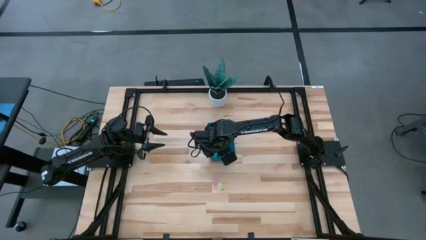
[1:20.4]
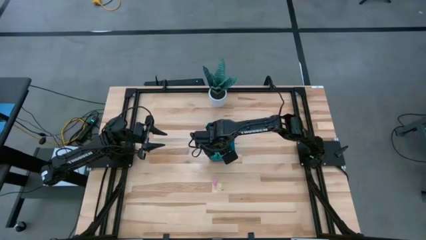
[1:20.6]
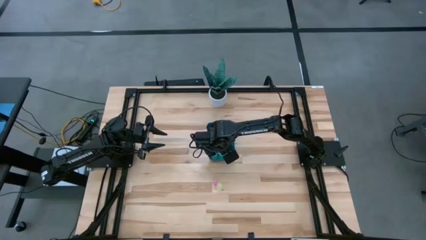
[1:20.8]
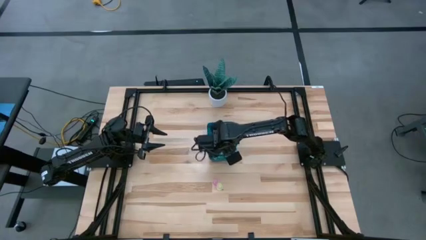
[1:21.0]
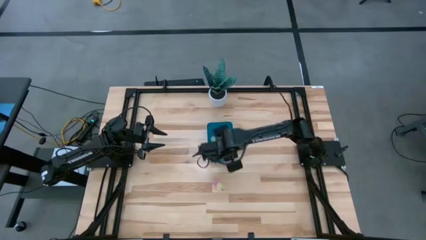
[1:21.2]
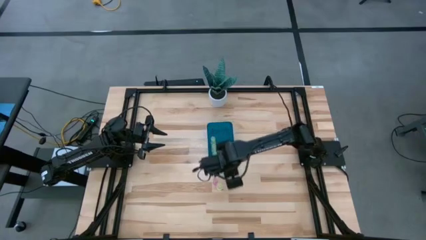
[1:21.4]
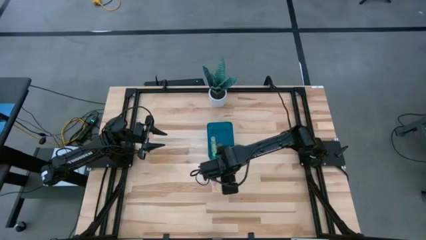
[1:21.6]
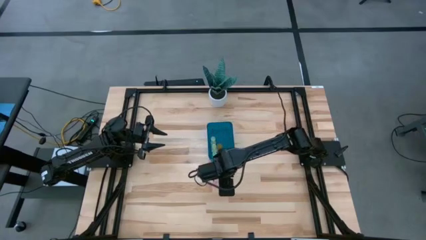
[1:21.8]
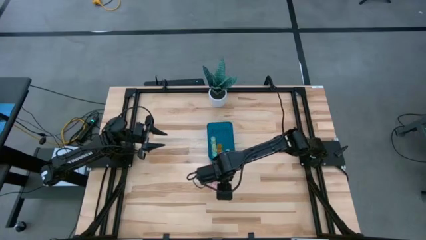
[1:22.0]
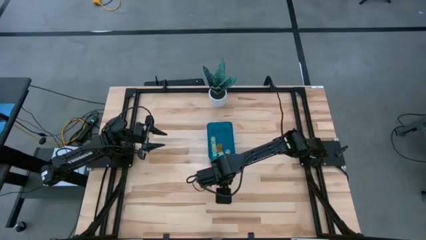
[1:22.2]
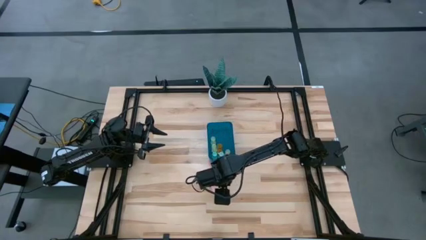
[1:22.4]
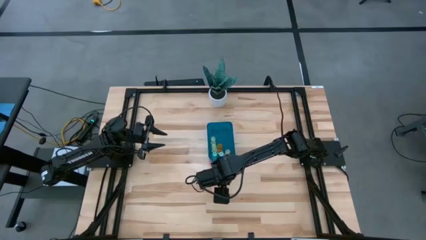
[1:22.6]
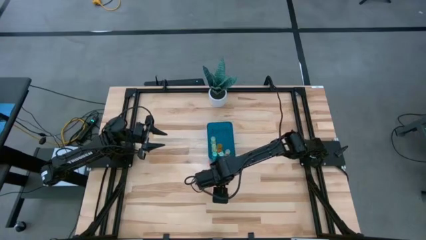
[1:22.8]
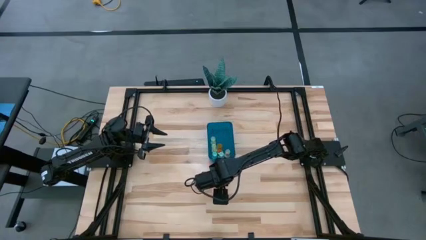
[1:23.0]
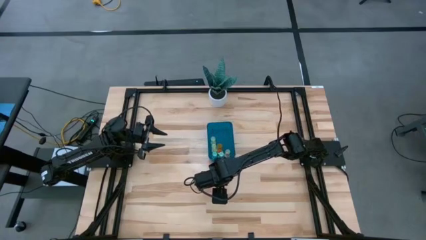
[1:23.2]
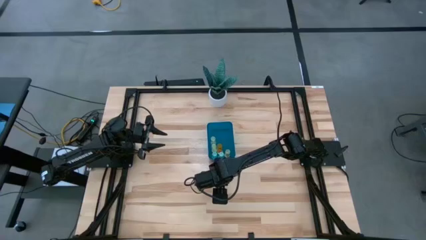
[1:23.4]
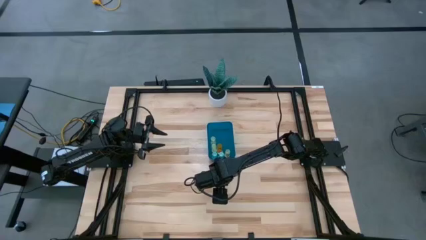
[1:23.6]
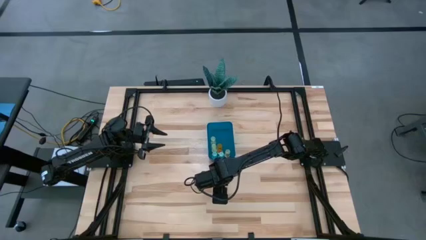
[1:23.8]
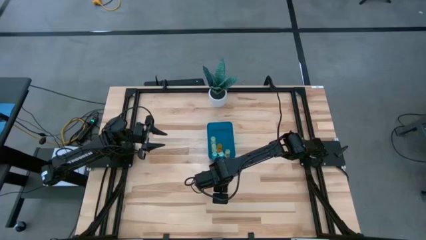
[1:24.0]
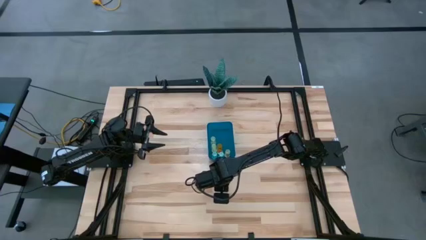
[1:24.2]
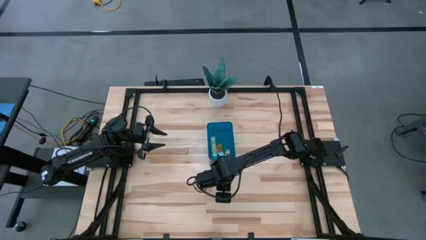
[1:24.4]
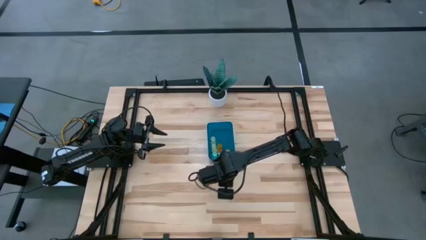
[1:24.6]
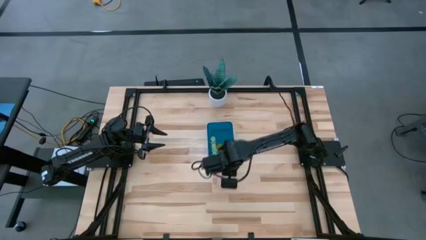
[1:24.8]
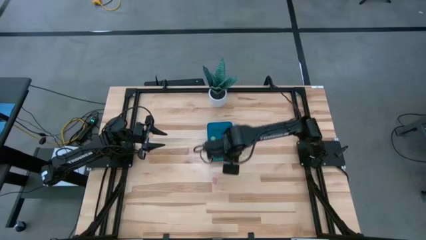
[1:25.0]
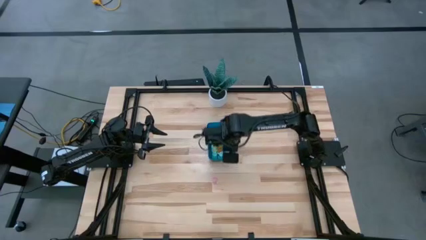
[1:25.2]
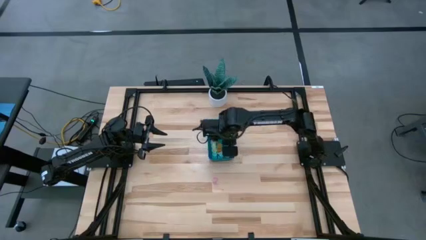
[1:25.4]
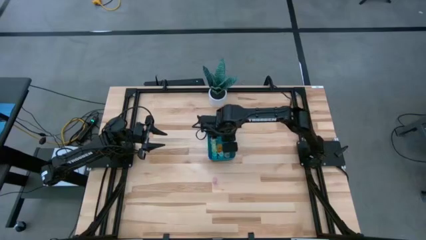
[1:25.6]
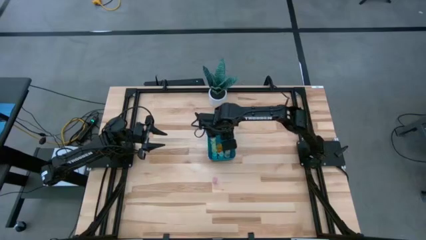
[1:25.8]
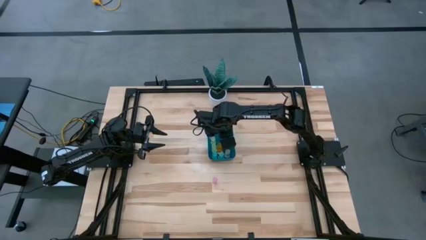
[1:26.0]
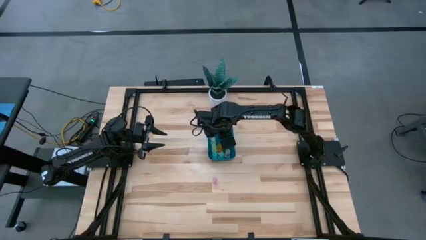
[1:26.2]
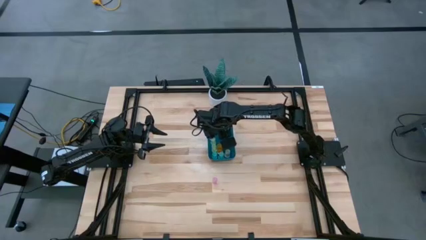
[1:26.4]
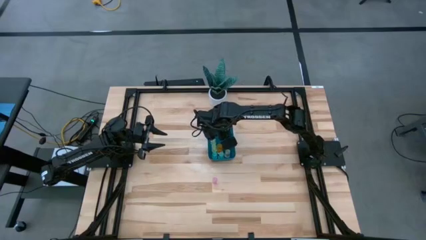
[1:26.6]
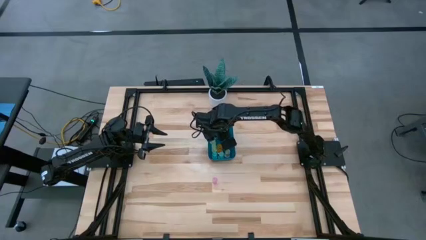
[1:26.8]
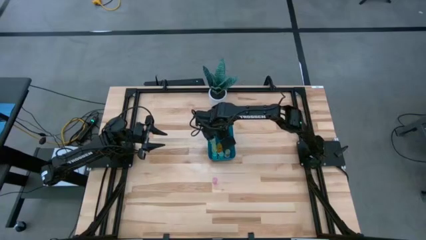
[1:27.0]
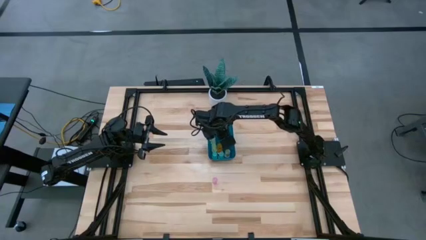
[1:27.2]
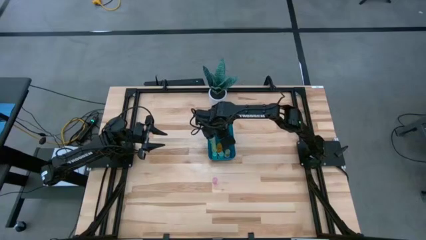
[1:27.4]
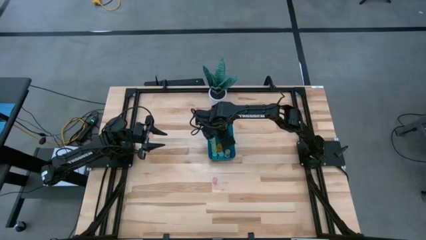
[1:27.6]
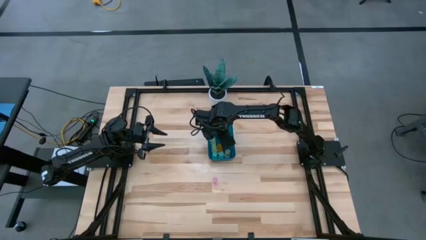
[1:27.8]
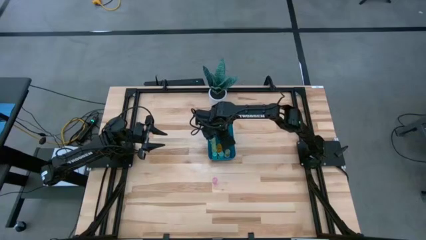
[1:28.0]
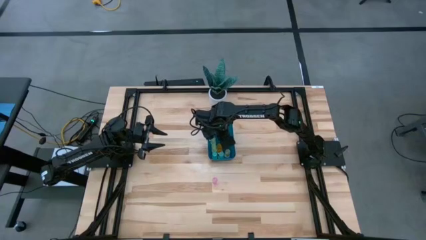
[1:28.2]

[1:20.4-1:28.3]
Task: Pick and place pill bottles into a basket
Put the yellow pill bottle into the blue container

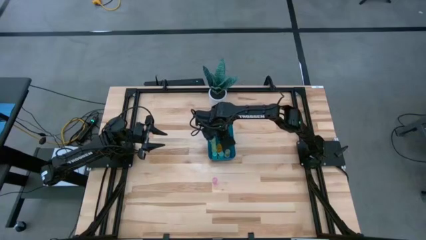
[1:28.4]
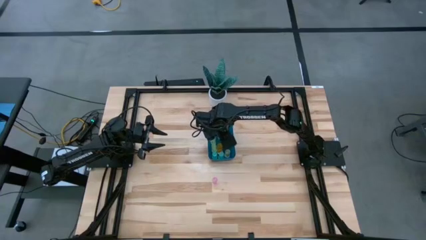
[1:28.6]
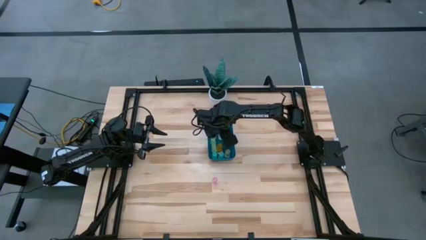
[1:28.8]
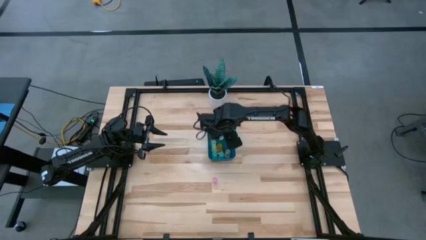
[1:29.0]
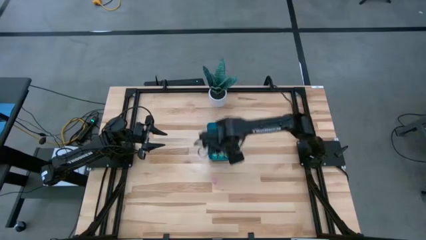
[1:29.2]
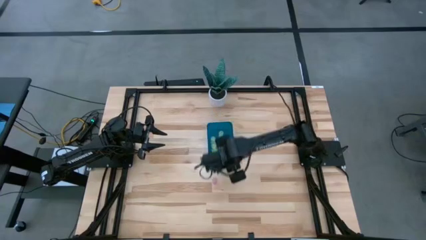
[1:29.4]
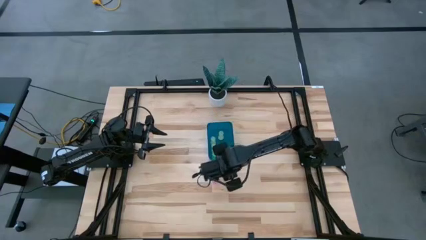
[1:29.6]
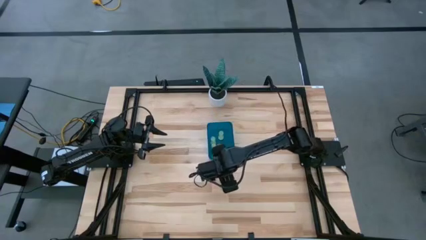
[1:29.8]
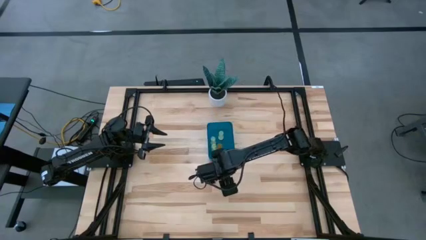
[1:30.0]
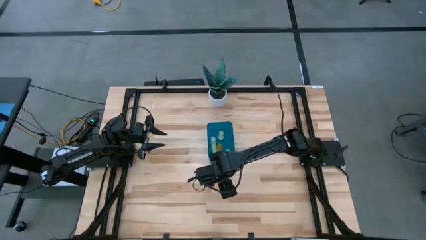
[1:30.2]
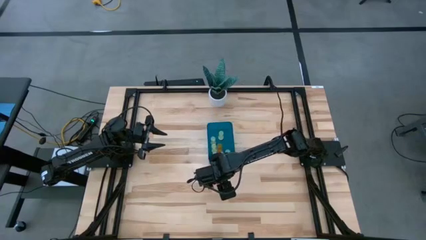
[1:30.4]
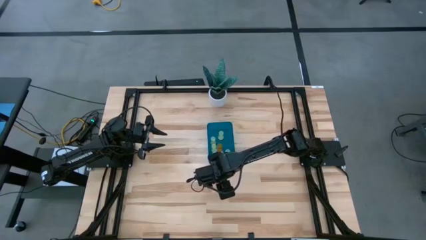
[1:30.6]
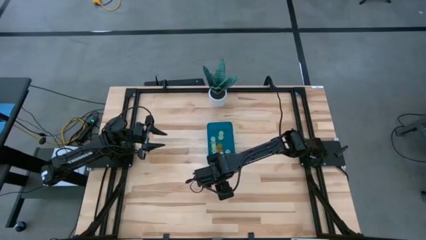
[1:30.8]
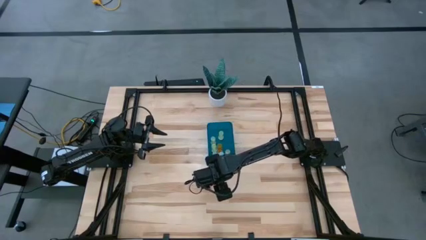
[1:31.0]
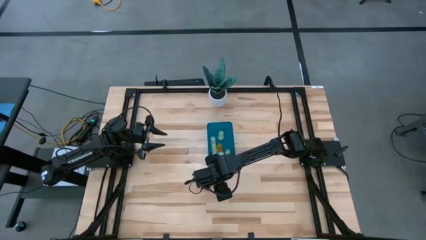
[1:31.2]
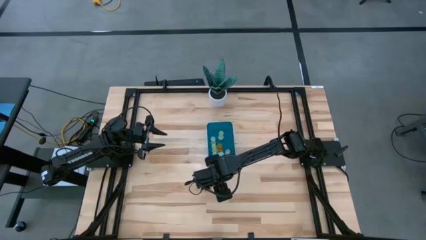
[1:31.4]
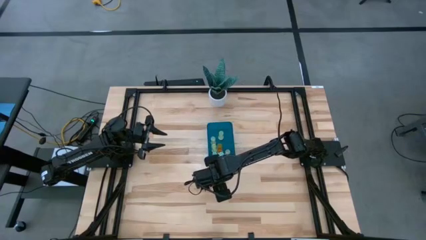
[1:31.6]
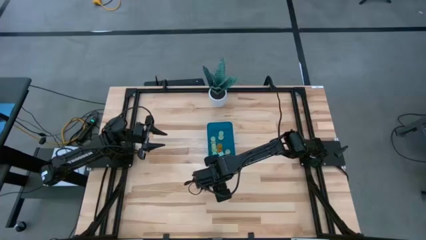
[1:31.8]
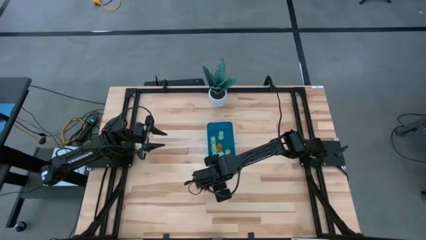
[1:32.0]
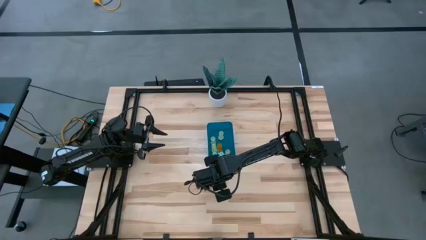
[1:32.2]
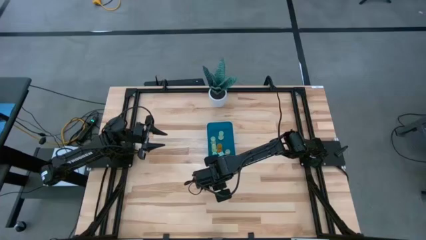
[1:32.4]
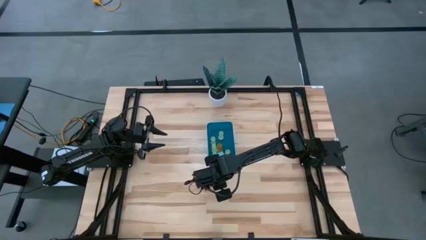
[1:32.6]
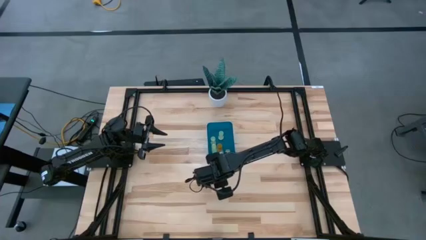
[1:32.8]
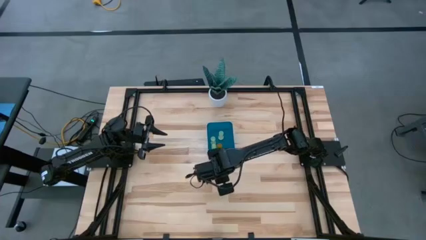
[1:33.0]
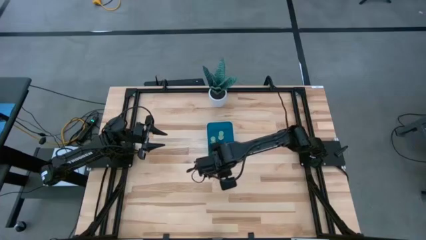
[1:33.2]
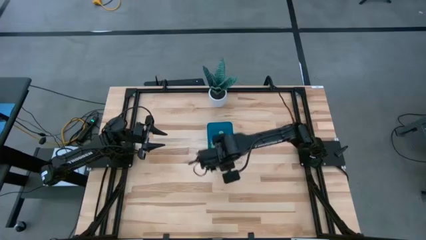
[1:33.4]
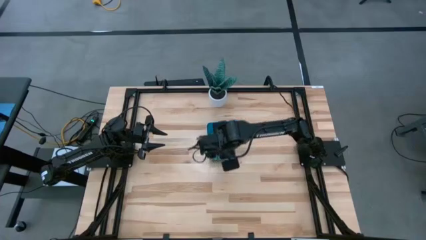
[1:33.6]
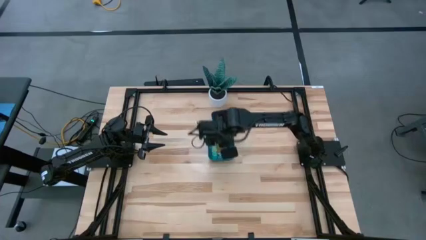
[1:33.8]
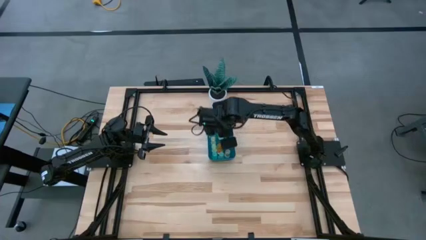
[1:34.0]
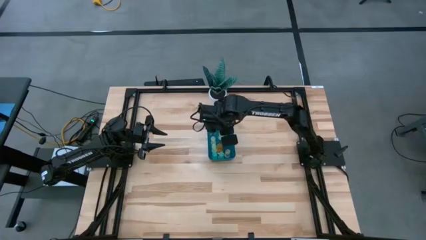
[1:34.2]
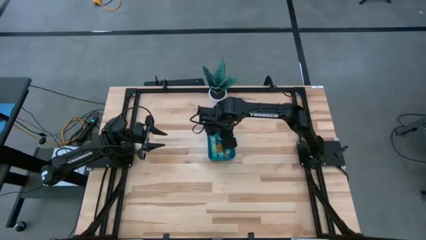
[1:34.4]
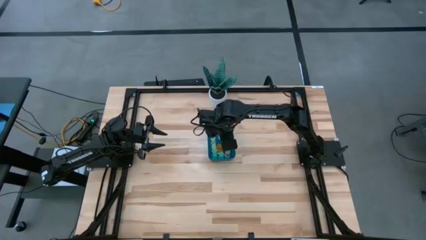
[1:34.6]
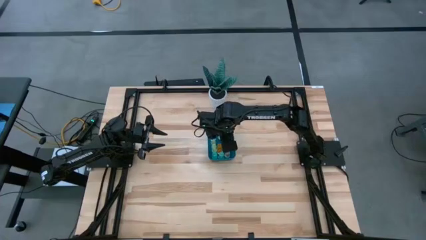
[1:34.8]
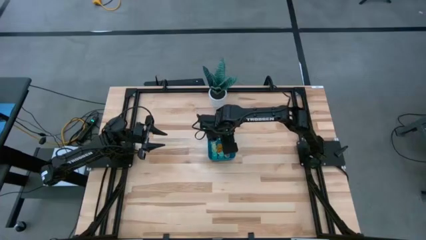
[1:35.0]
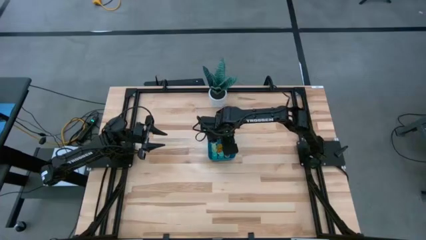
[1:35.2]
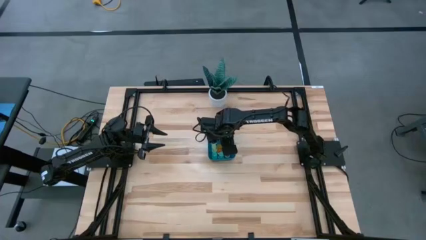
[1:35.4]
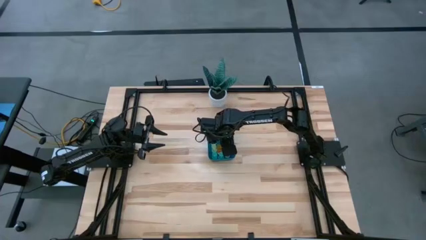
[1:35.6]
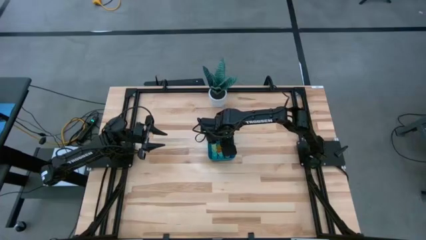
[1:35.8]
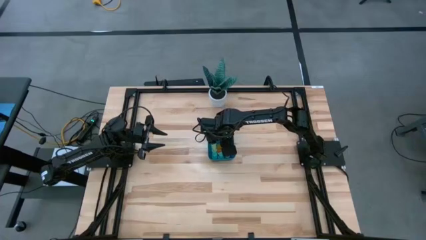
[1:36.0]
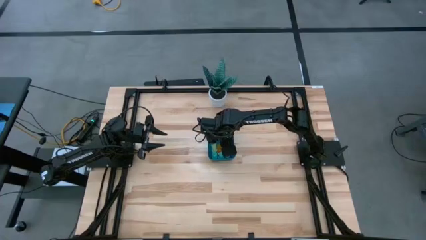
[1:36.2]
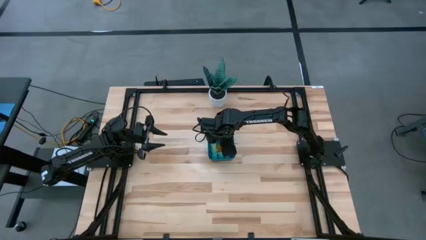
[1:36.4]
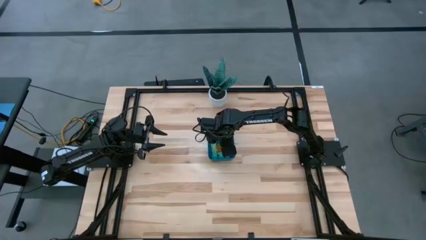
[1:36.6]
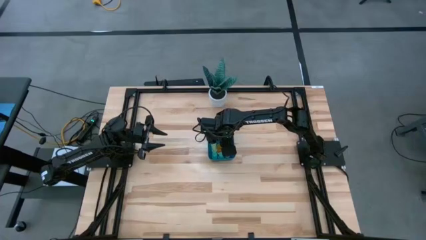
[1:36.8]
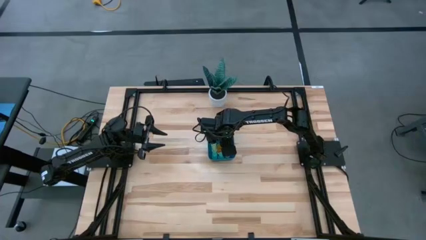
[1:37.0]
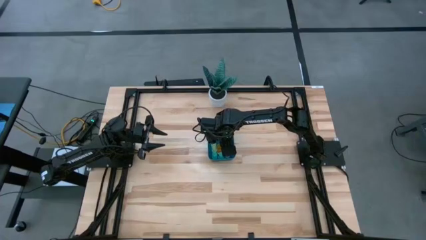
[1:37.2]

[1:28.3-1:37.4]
Put the pink pill bottle into the blue container
